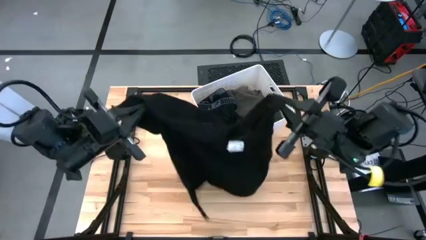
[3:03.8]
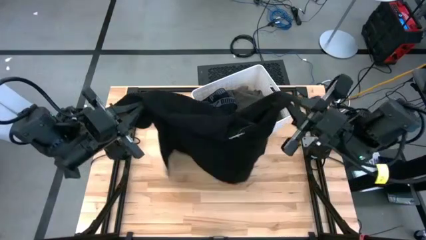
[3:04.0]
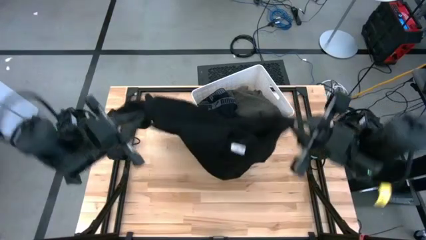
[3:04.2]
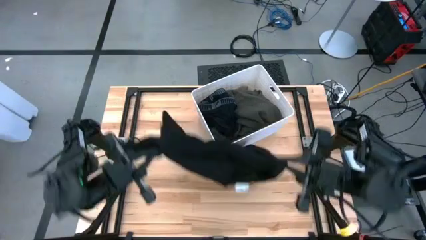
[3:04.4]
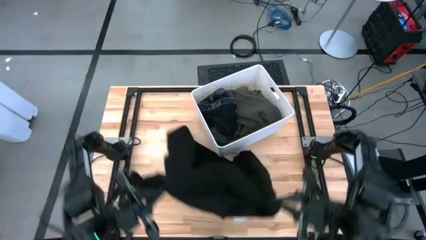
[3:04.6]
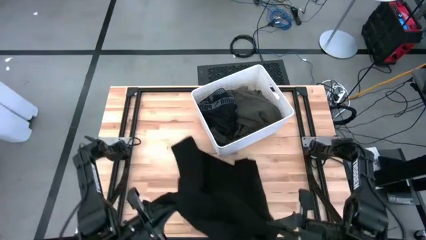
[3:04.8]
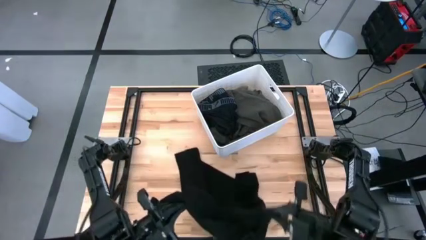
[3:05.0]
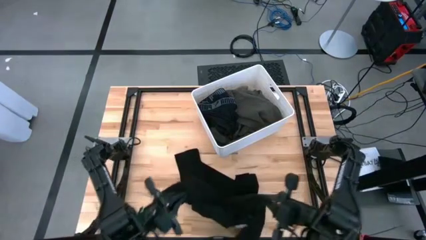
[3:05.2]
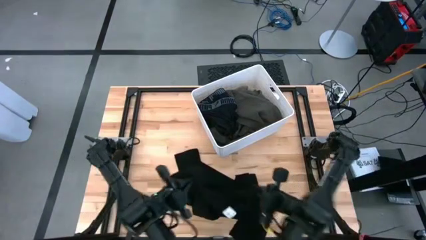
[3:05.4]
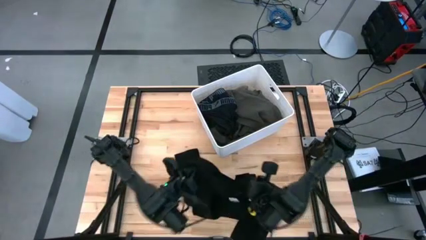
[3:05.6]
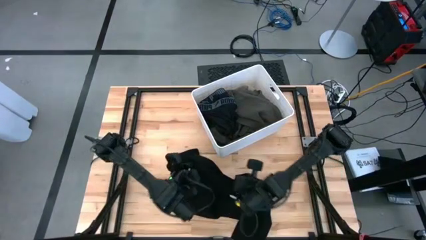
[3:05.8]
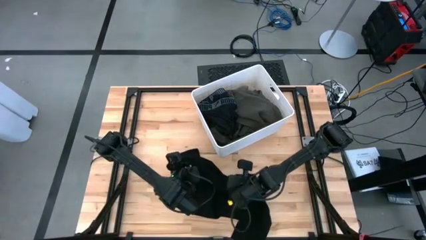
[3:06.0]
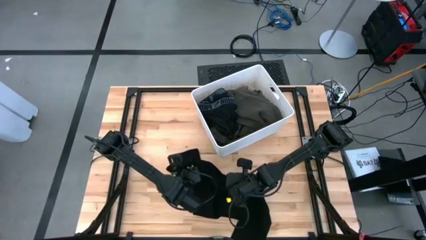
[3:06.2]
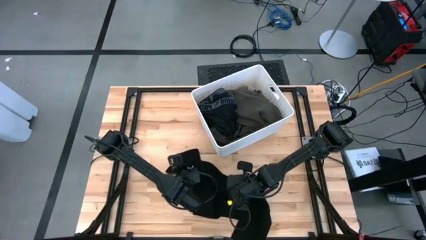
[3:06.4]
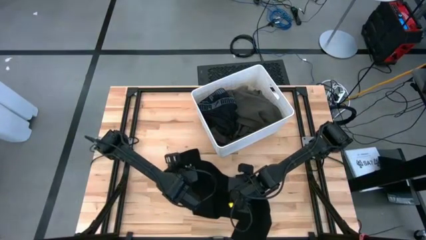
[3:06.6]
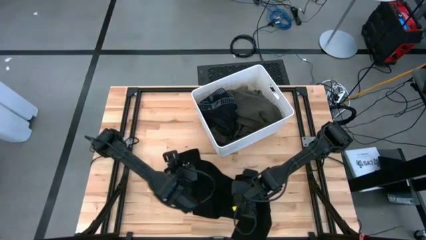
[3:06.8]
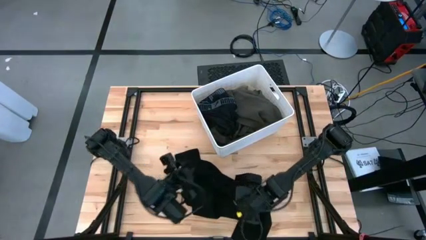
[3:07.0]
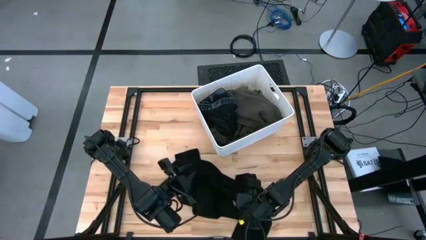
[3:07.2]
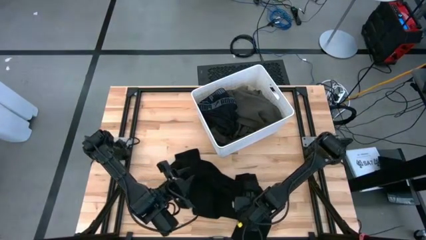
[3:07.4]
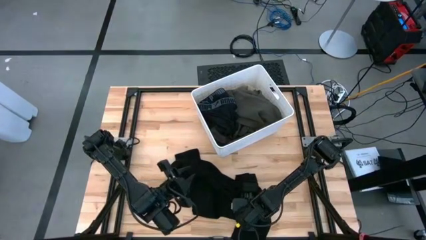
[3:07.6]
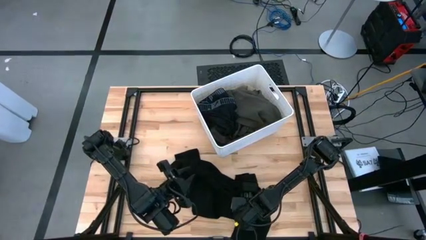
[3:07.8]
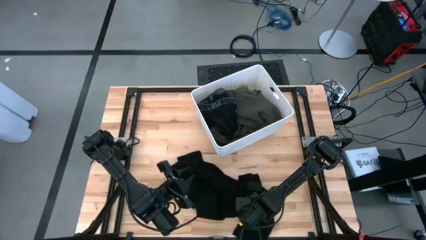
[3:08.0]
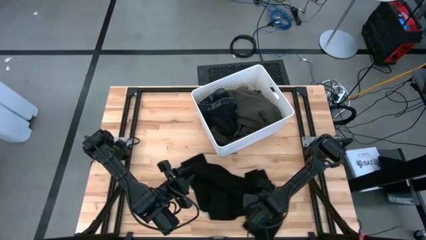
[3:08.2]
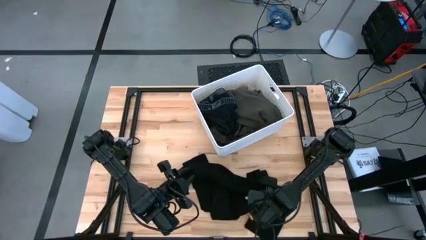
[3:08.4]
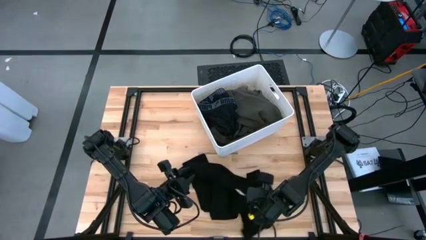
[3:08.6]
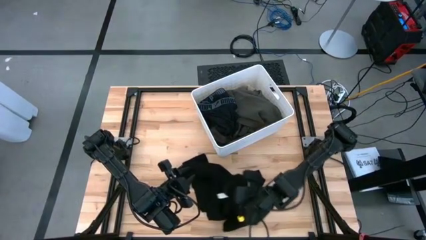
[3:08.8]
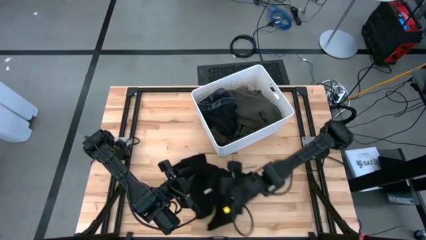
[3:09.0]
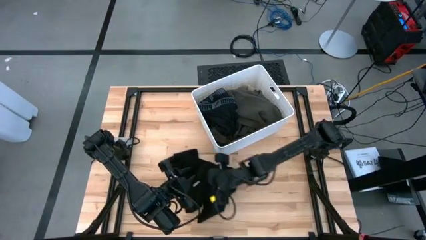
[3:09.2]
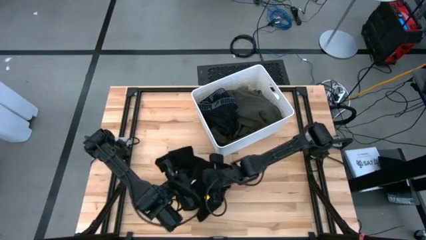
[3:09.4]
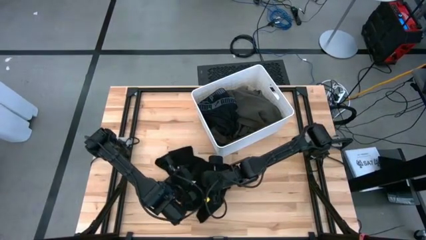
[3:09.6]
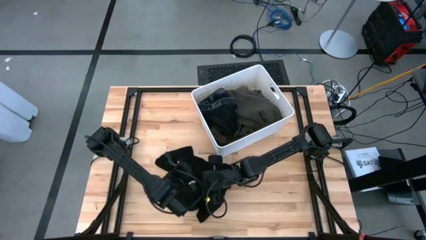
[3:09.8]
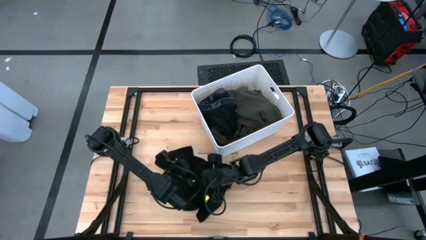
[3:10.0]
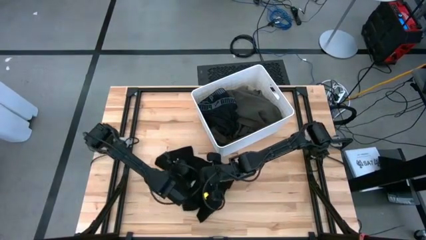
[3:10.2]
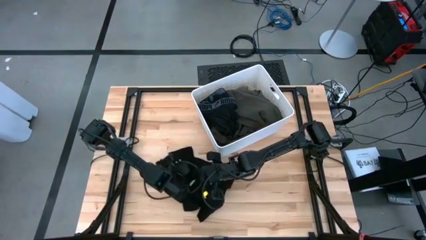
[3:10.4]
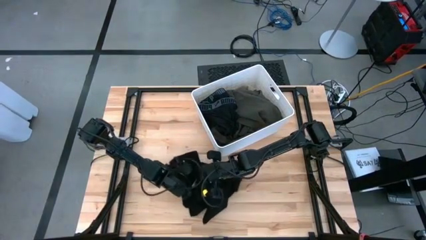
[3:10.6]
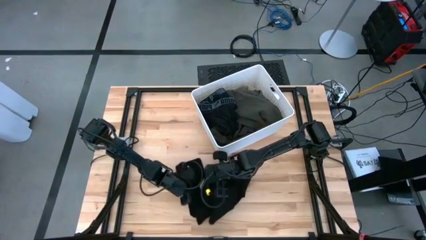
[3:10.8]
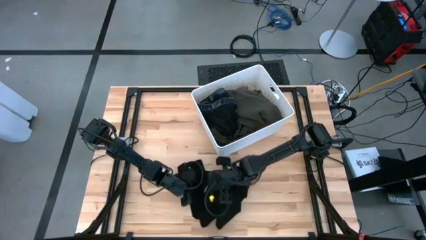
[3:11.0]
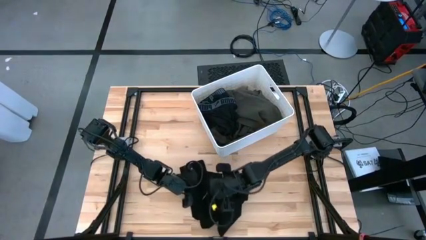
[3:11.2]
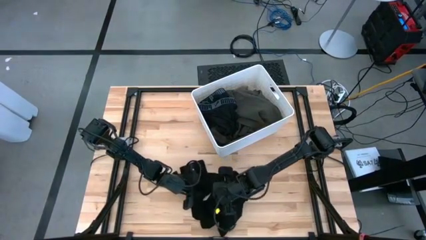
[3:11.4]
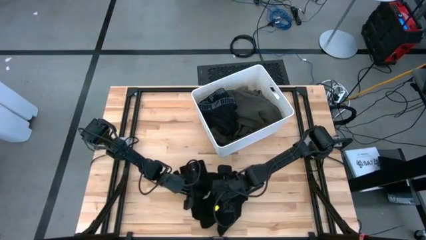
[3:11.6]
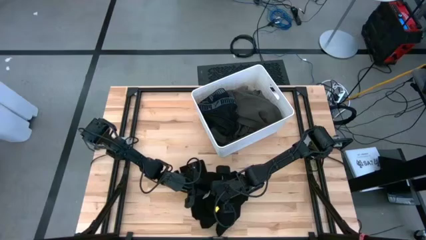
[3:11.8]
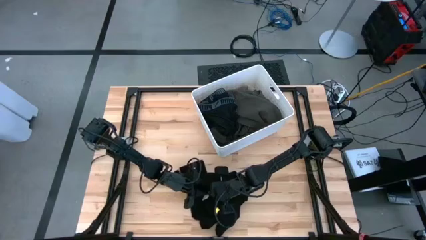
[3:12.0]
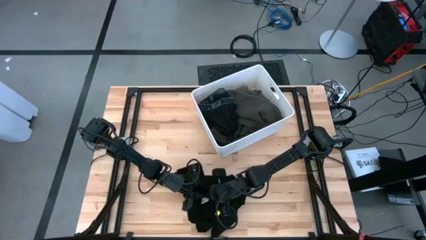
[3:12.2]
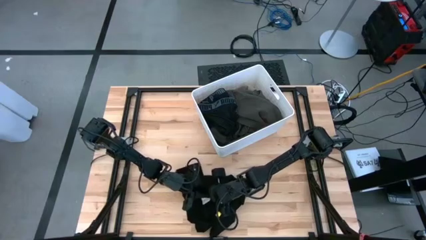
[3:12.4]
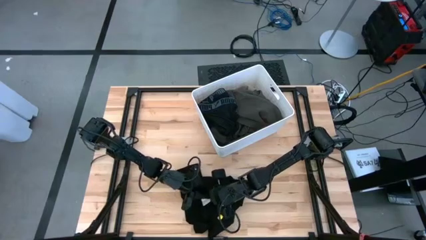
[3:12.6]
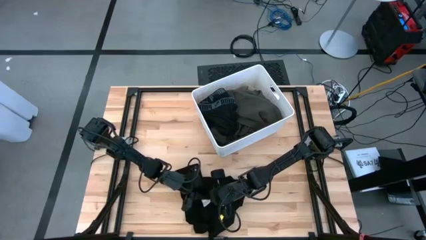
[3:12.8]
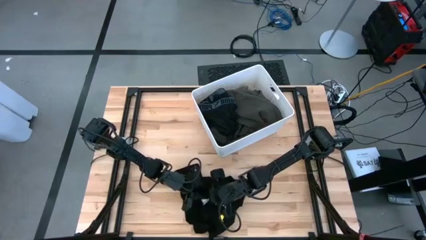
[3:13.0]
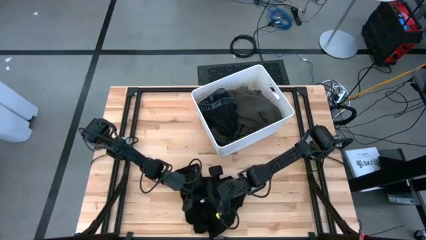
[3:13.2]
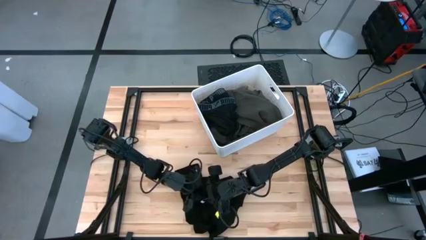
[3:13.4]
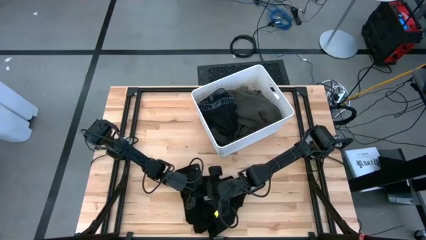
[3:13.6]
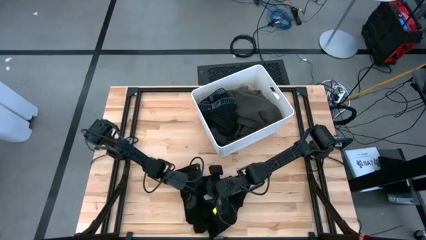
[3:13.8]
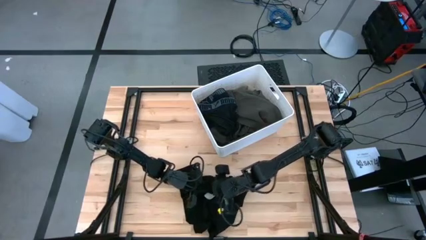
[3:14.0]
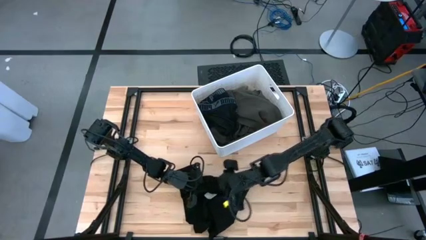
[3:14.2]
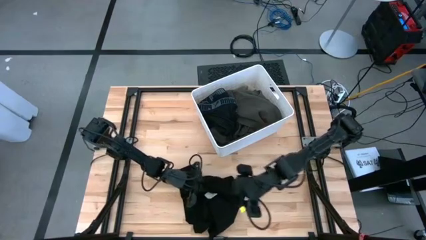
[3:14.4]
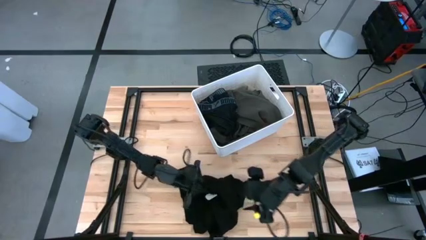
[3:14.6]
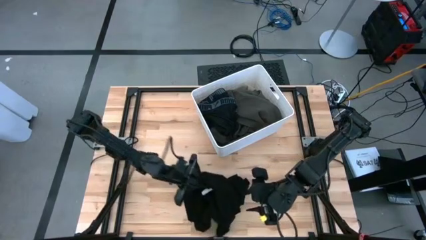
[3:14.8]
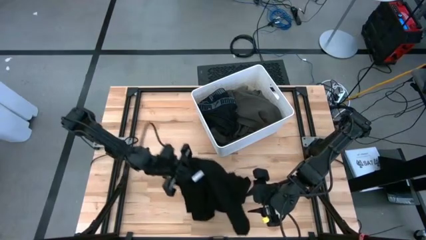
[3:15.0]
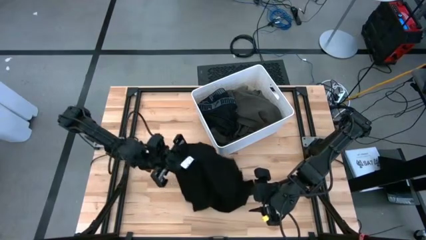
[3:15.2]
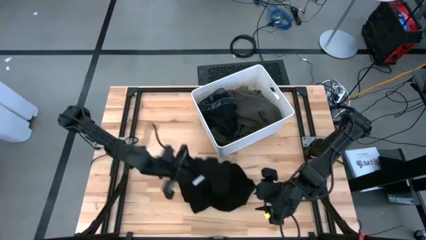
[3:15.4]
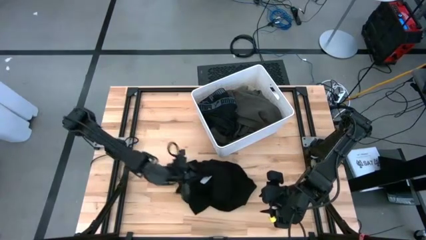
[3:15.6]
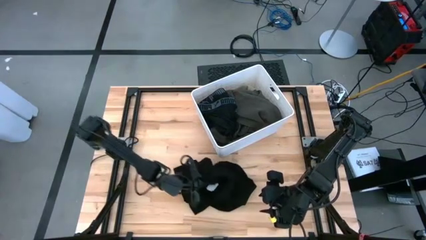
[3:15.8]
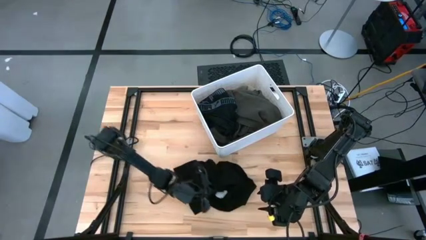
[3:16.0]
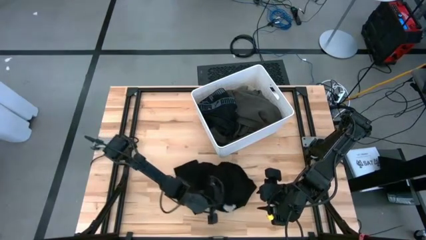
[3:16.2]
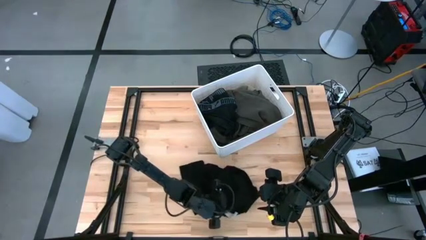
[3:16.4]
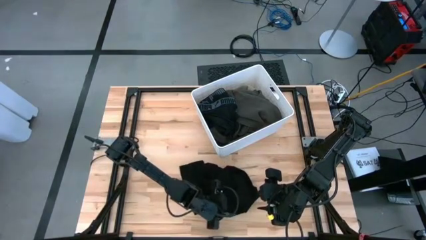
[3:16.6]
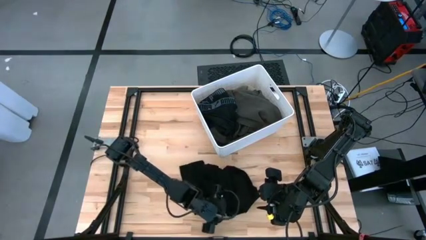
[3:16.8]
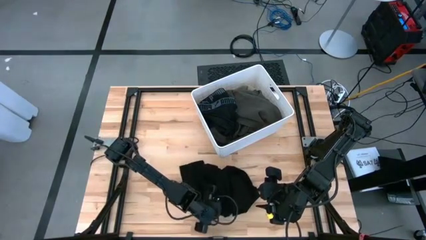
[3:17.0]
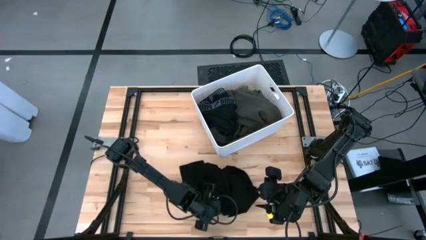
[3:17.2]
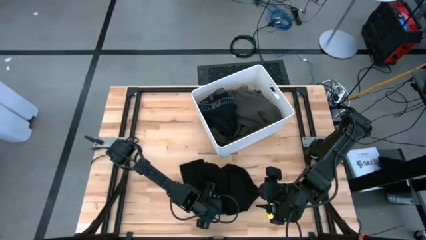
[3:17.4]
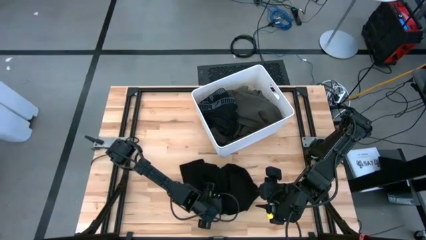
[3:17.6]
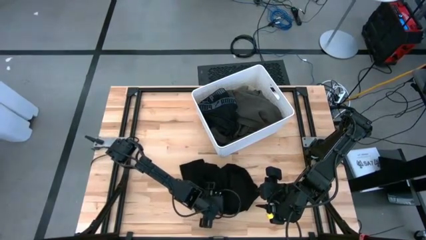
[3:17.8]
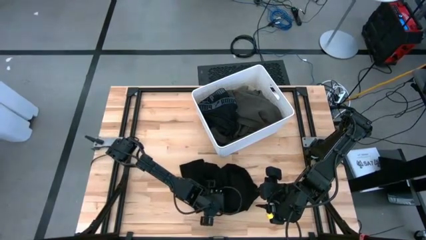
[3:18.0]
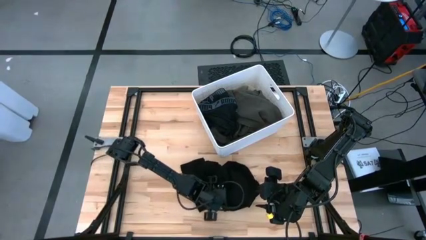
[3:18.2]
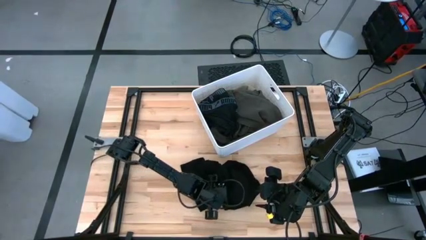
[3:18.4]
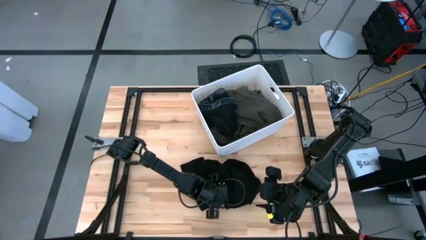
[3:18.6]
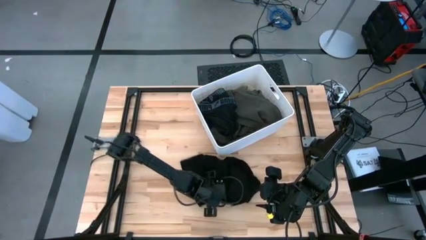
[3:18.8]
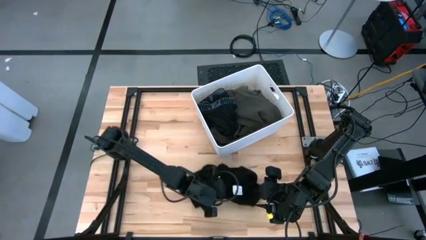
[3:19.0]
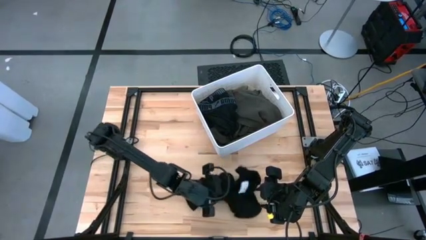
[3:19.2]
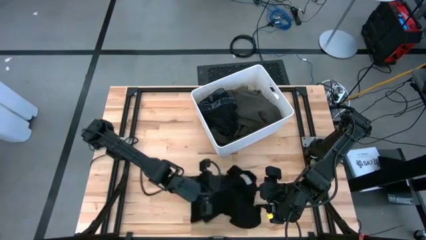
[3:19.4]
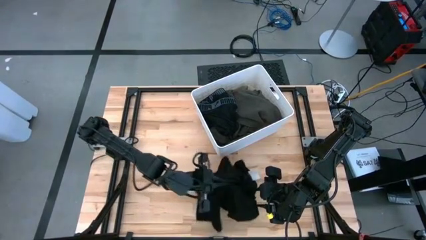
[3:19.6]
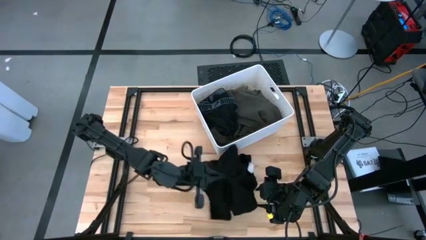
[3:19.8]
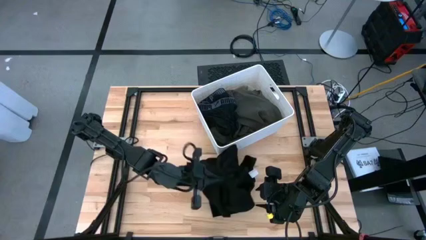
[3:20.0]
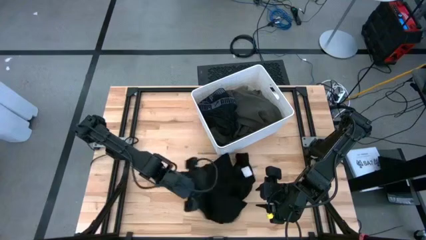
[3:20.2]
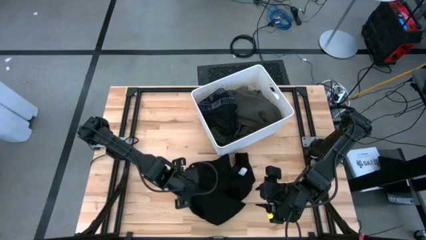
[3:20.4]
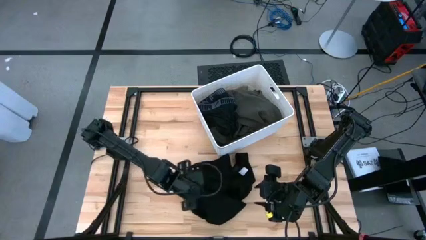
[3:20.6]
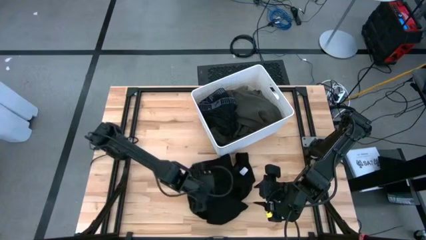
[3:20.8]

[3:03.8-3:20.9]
Task: Sort clothes
Put the black shirt into the white bin
